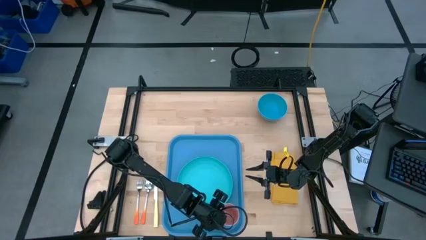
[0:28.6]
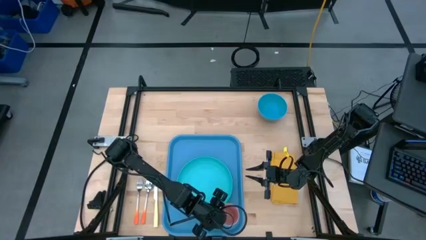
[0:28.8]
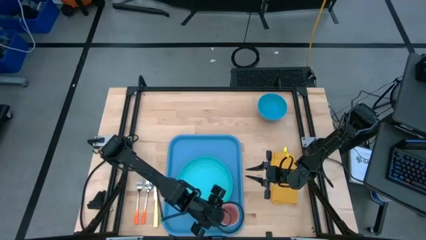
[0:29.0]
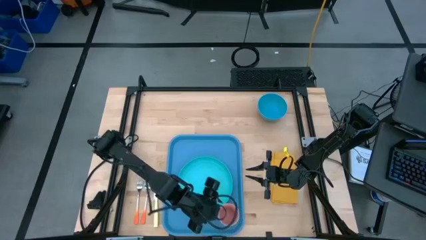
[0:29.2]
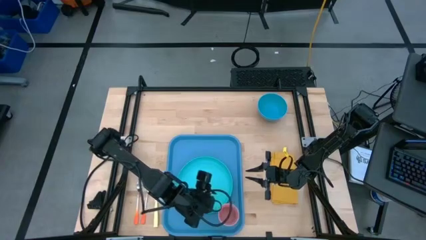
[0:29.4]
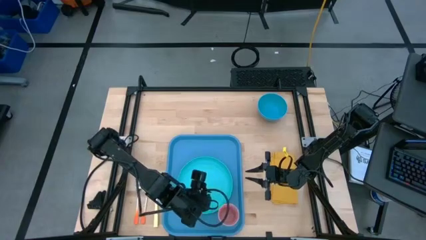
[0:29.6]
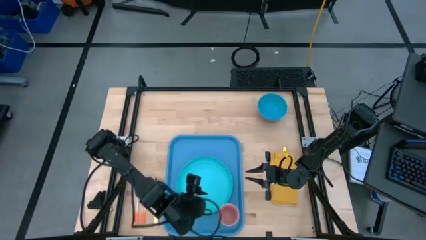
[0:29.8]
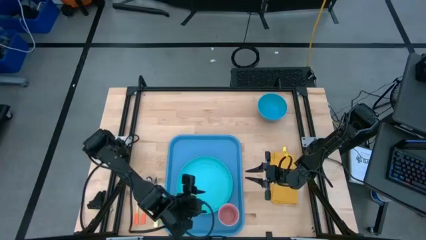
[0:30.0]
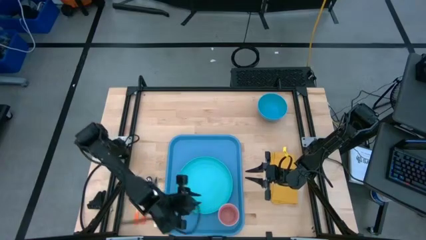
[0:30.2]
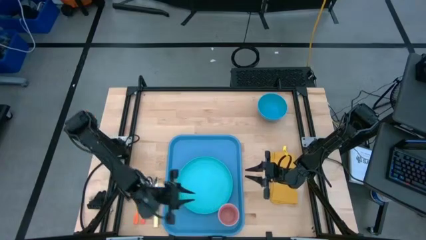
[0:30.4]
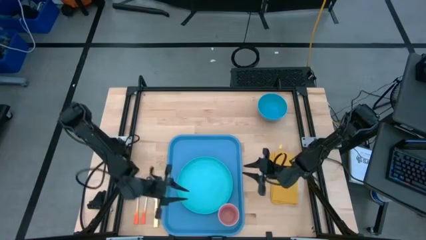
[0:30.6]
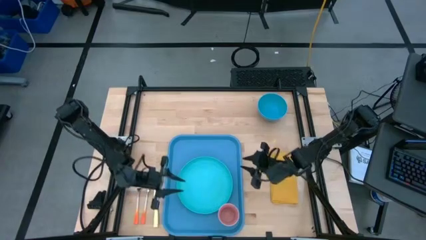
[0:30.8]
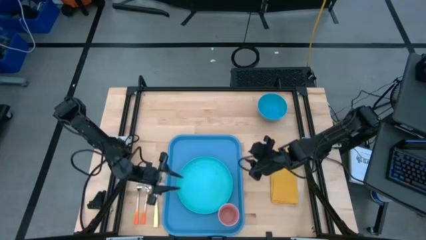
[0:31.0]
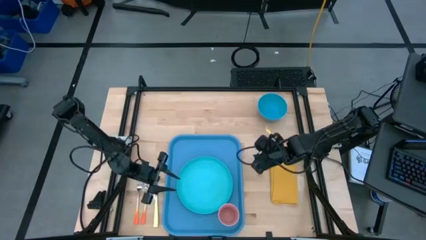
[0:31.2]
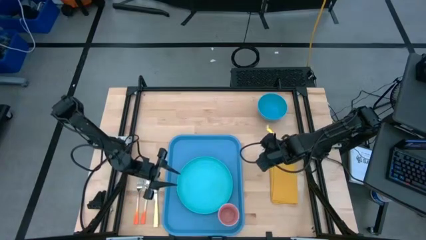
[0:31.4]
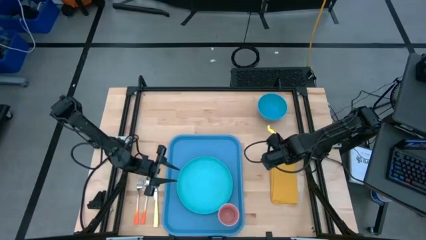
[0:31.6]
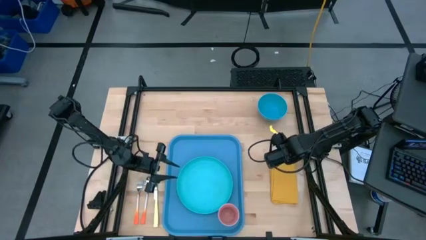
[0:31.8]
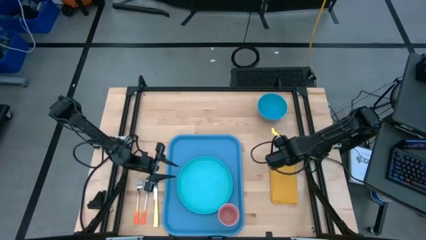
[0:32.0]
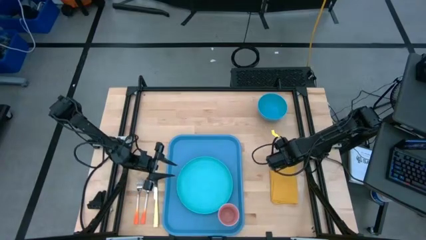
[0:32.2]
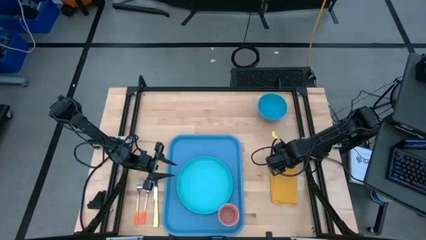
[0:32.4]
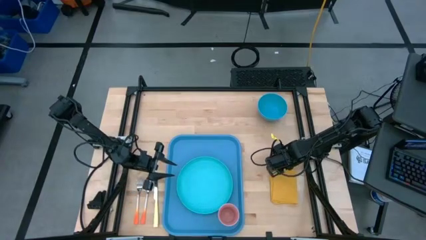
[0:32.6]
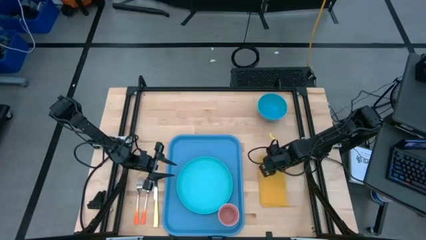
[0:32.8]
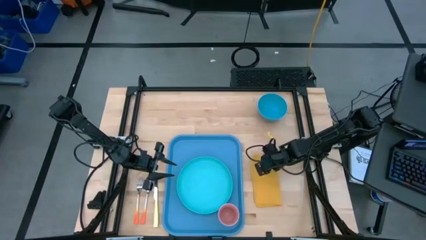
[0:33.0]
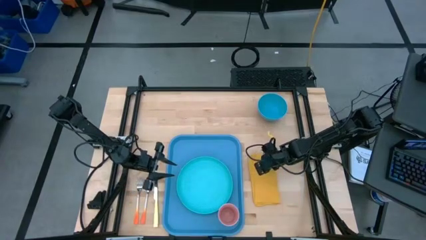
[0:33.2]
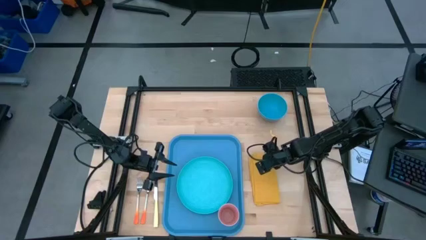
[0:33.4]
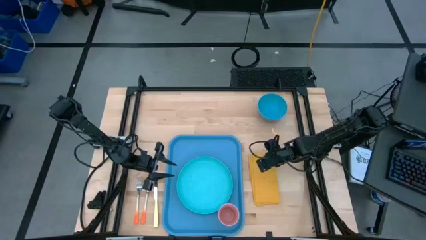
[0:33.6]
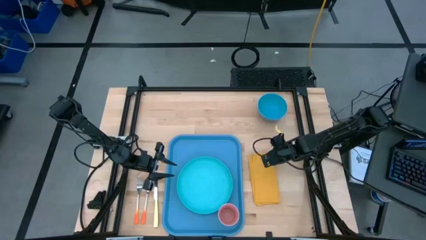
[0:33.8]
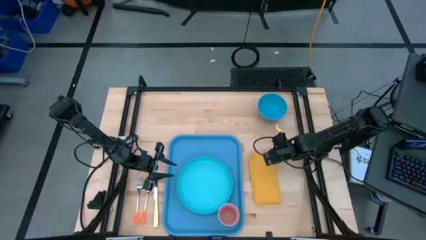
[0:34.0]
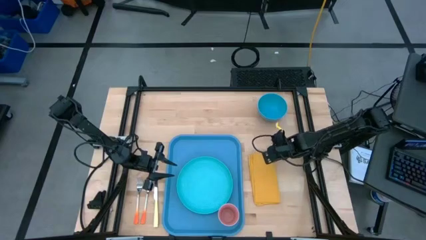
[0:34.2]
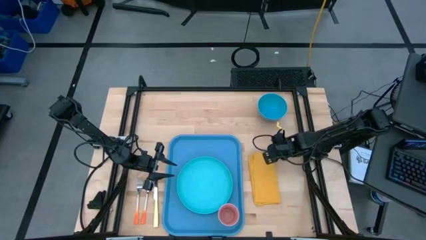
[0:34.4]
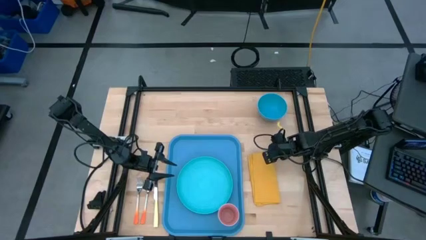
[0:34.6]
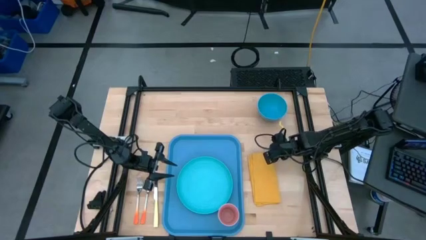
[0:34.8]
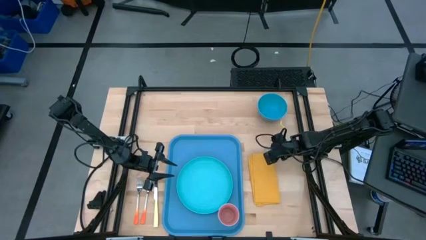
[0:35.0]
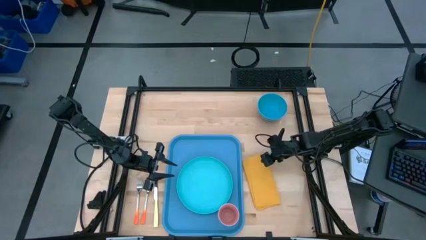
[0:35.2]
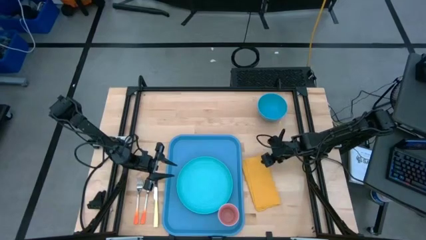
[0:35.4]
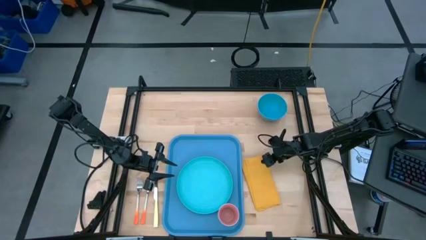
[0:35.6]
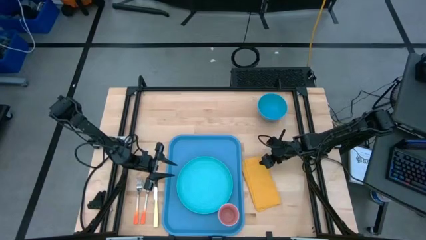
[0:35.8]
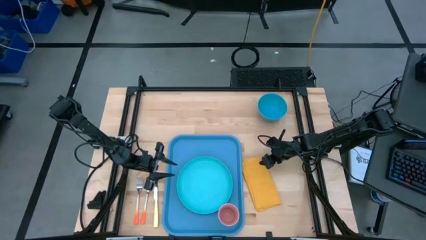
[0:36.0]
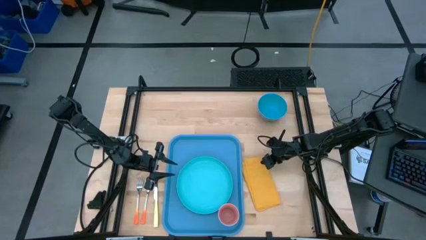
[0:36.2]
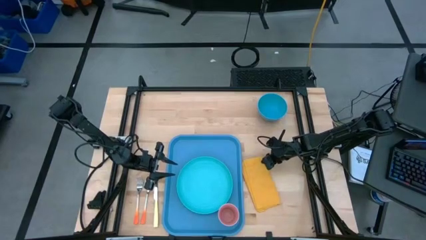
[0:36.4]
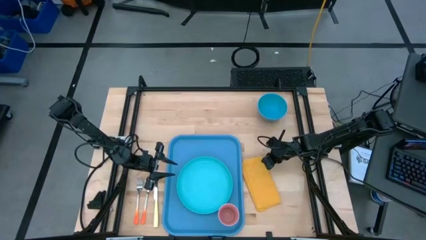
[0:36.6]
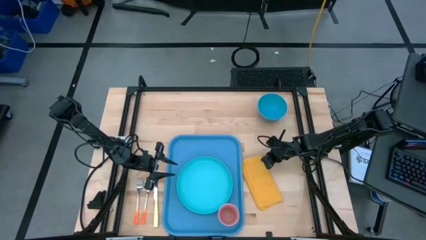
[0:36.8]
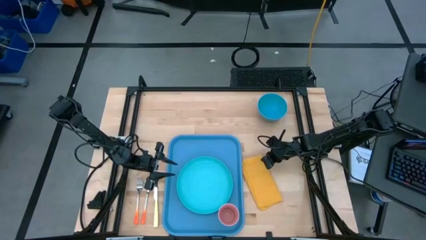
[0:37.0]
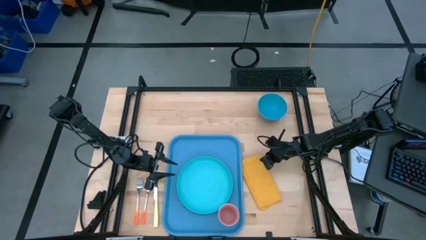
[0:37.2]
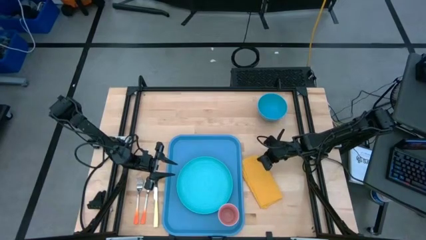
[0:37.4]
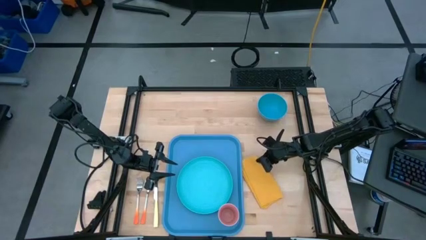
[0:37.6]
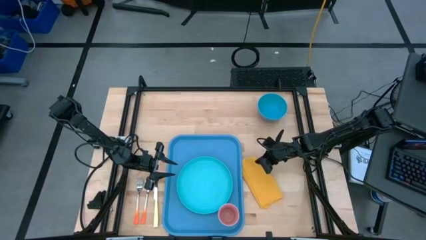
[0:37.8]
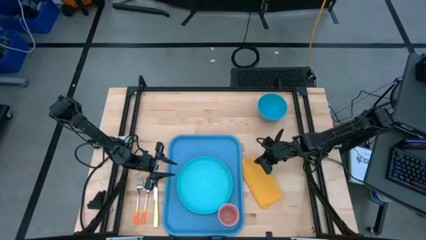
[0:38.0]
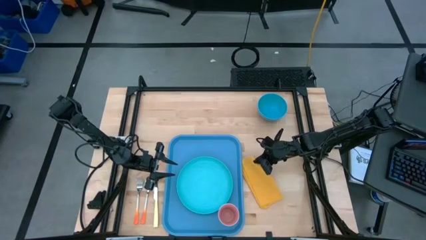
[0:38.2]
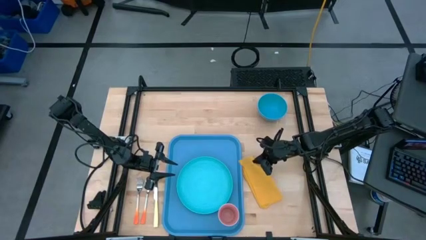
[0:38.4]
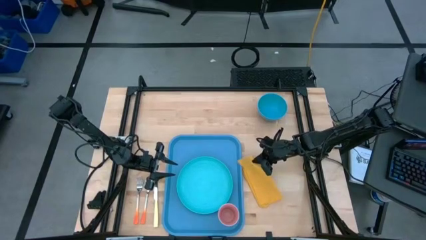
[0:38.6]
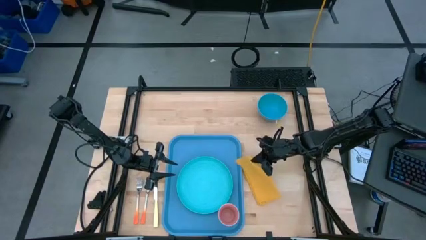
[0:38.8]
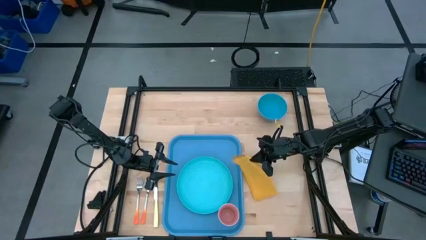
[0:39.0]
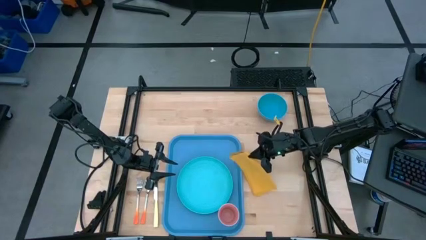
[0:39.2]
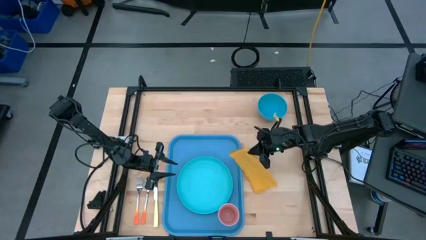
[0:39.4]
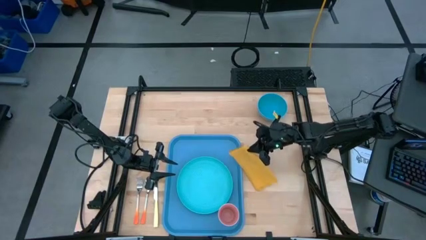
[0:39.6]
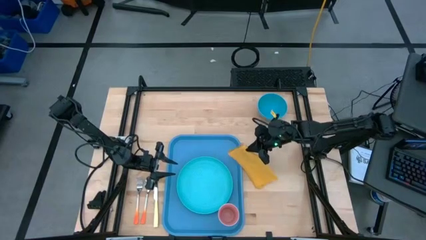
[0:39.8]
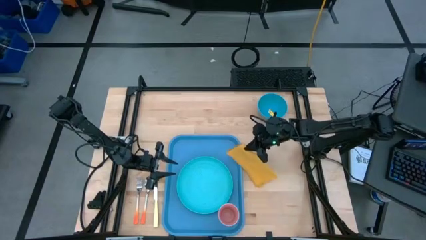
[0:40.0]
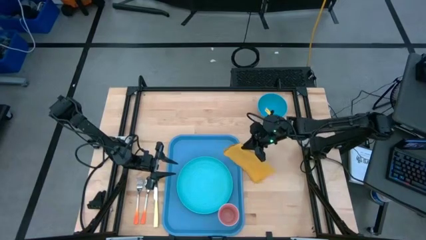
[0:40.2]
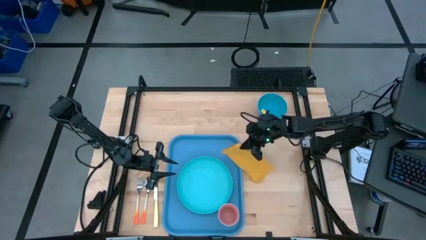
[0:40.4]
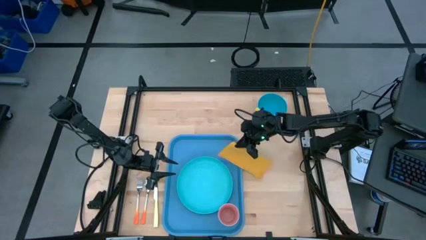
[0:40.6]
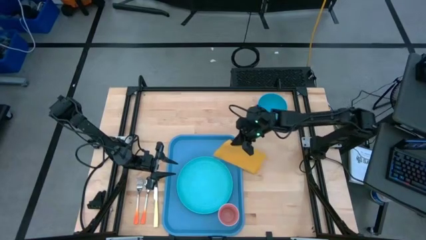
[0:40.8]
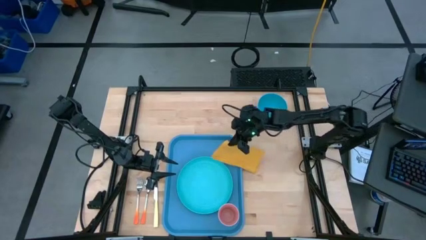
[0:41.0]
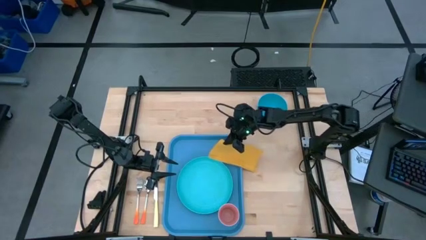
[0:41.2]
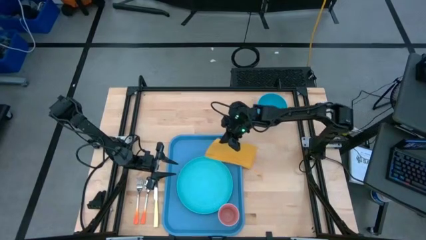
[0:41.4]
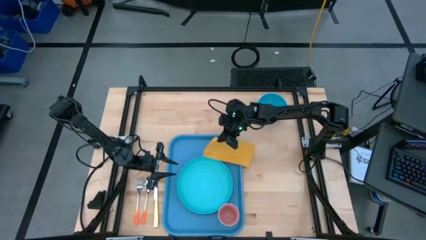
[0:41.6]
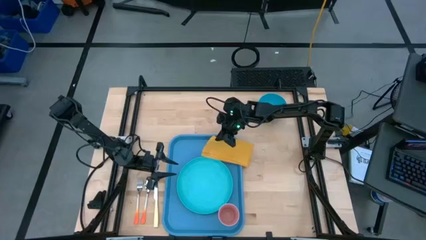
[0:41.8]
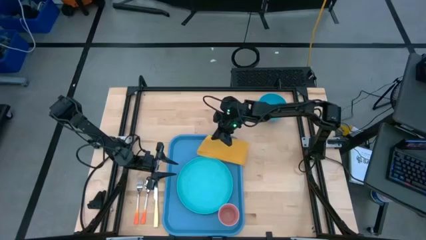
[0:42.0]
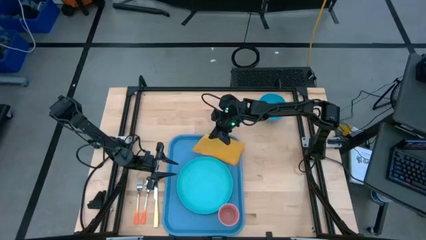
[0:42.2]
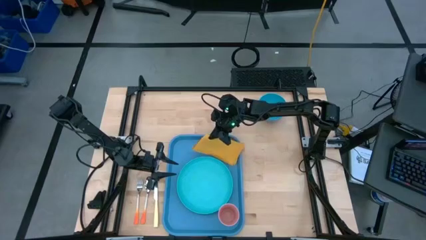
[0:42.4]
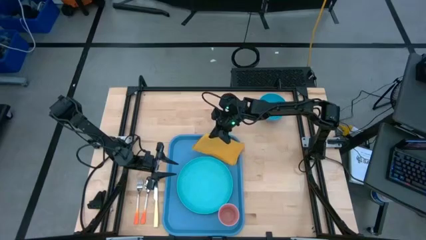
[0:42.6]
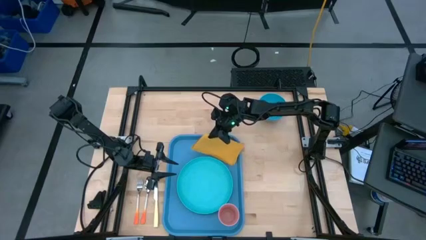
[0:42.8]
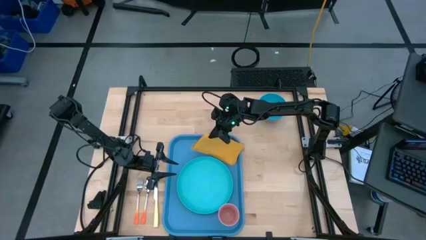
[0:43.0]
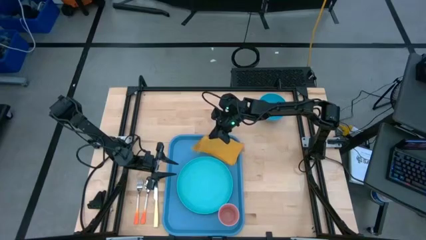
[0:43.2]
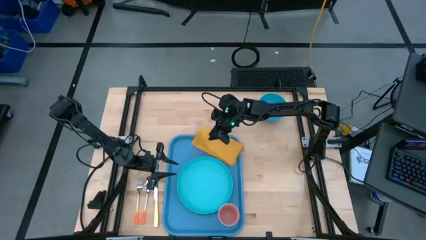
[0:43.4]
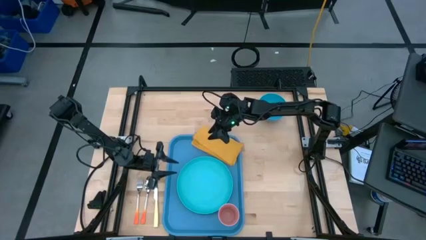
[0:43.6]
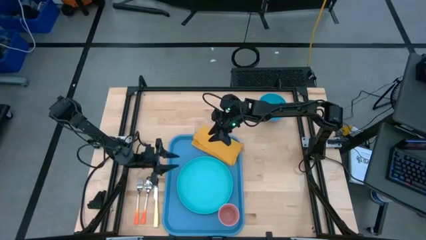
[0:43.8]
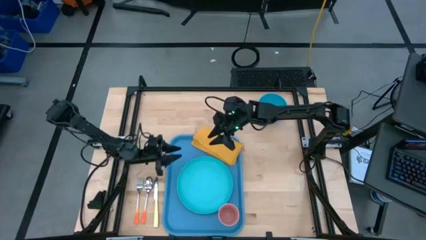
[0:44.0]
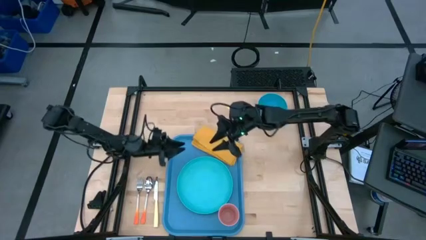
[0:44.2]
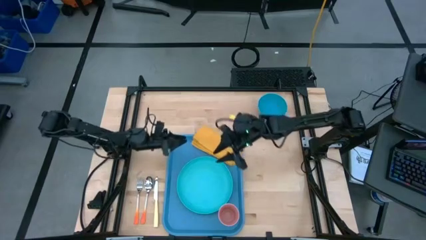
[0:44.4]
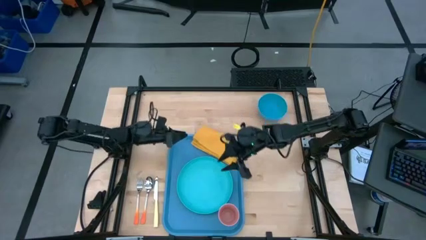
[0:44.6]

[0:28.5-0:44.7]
Task: Set up tray
Put the yellow napkin to the left of the blue plate on the blue serving tray

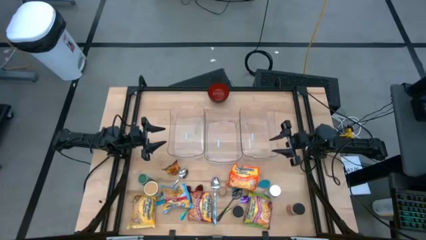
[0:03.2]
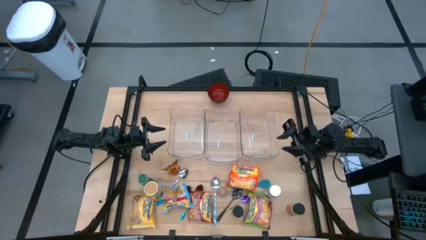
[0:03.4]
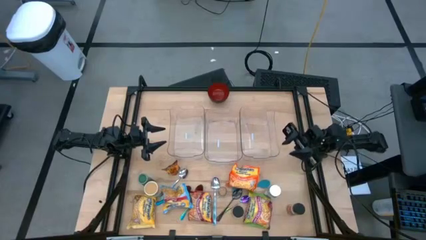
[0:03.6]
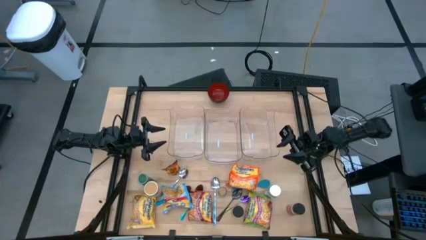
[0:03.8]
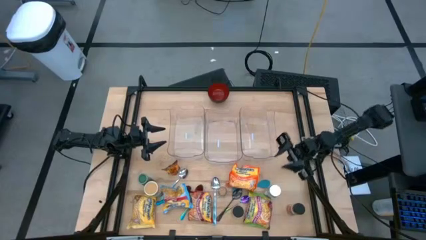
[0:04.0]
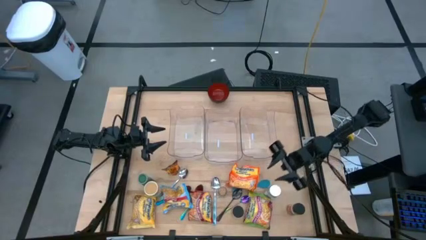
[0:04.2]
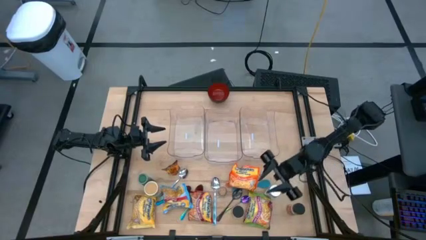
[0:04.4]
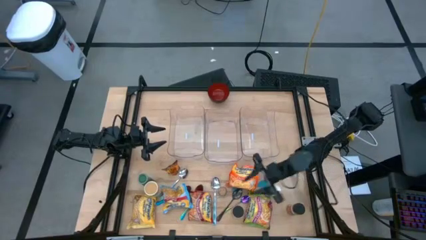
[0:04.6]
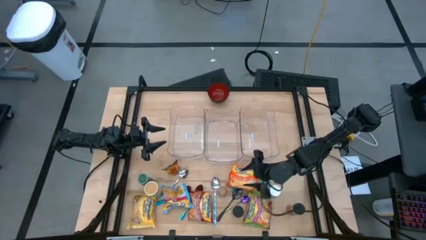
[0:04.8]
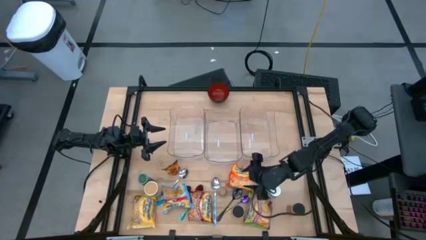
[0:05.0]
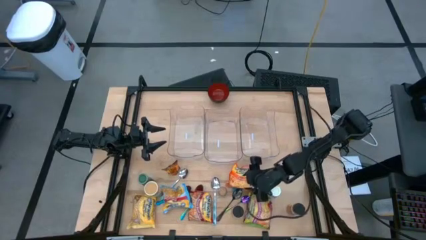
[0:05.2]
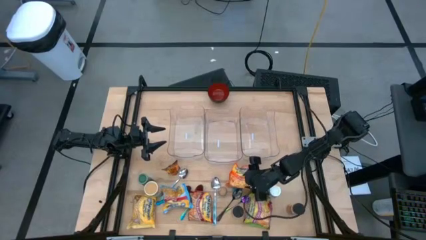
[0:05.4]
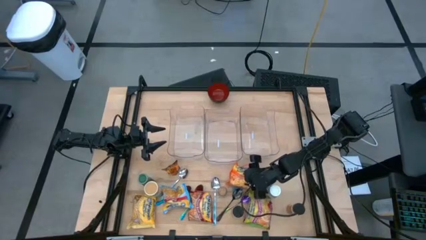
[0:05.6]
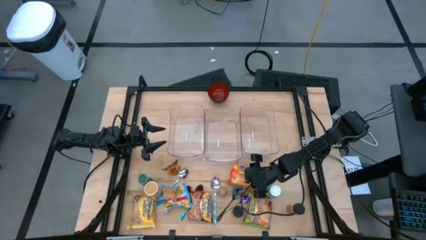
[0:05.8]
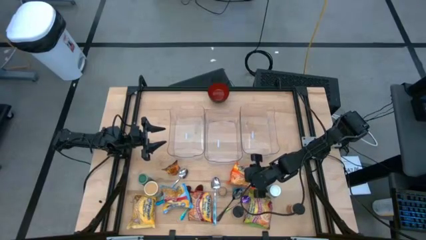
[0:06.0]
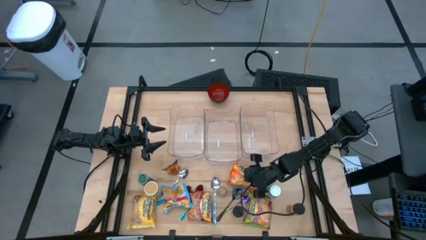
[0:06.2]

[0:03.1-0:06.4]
Task: Pick & Place Food Item
Put the orange noodle pack into the right transparent bin
